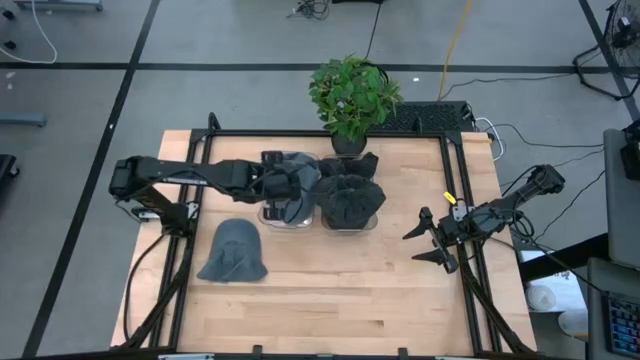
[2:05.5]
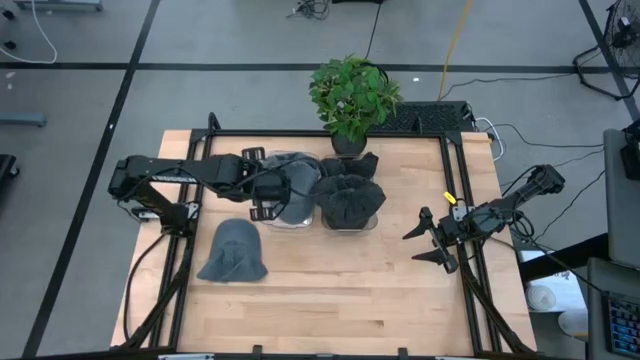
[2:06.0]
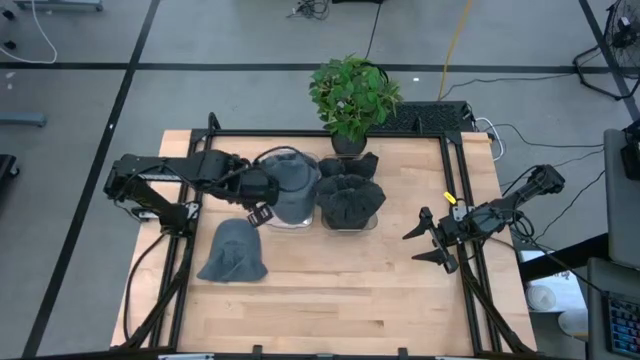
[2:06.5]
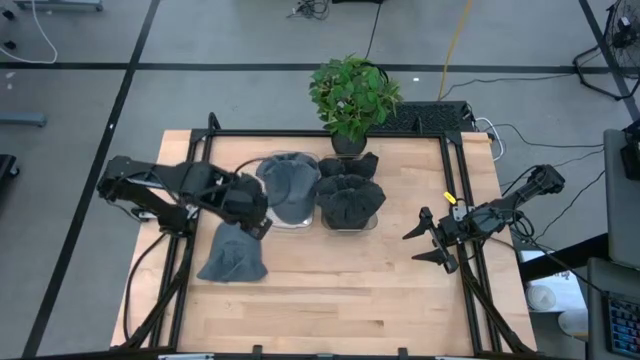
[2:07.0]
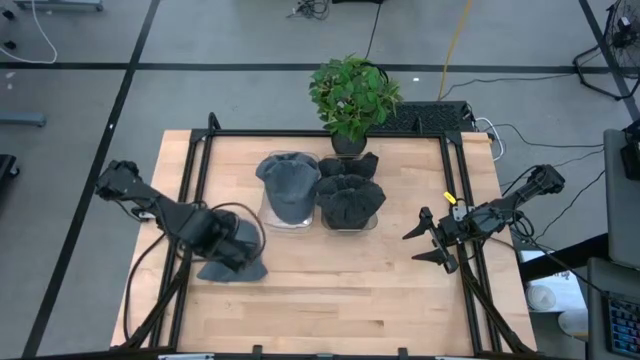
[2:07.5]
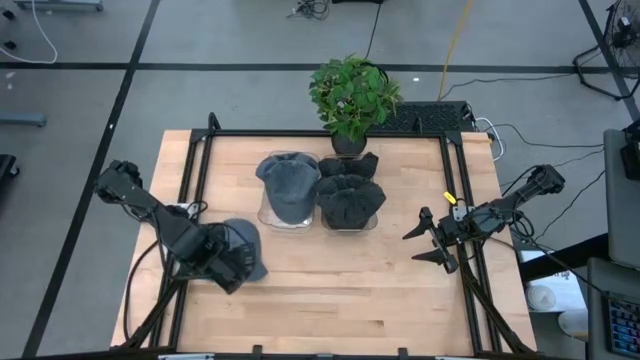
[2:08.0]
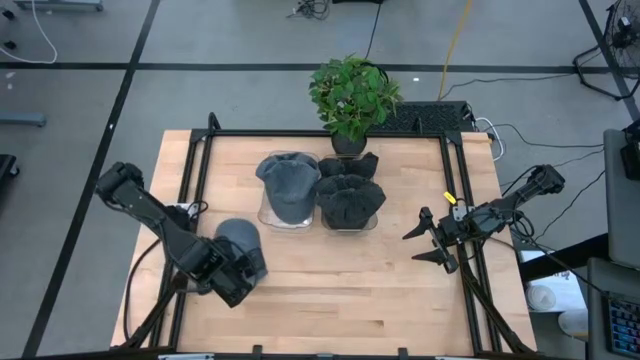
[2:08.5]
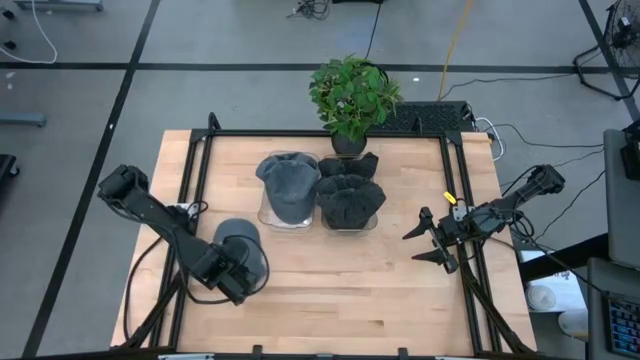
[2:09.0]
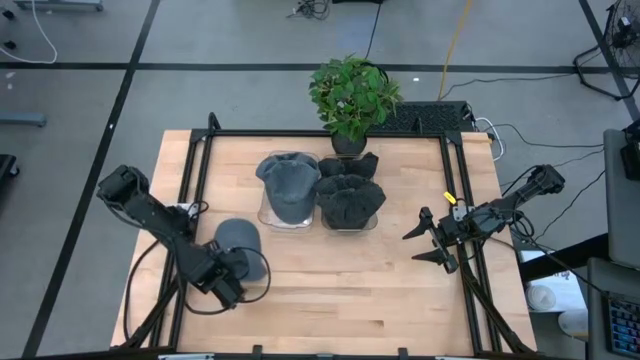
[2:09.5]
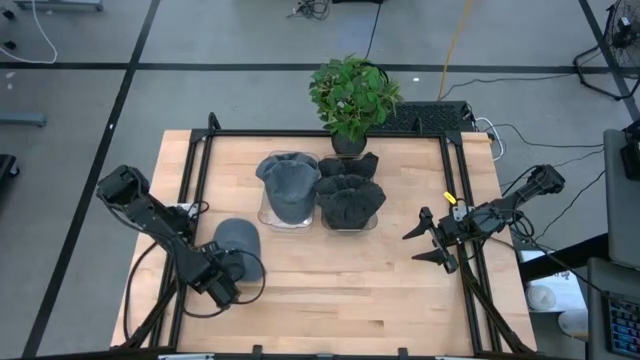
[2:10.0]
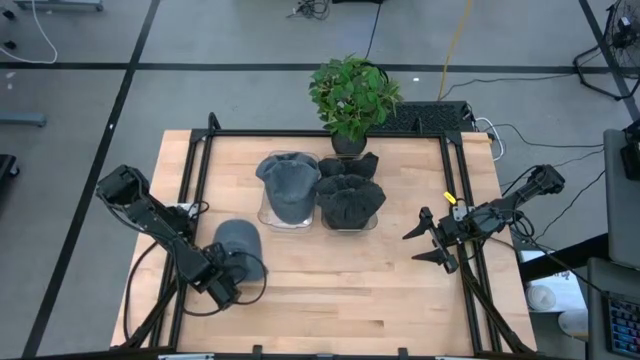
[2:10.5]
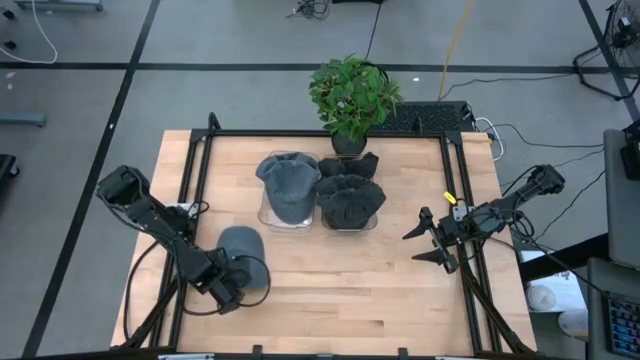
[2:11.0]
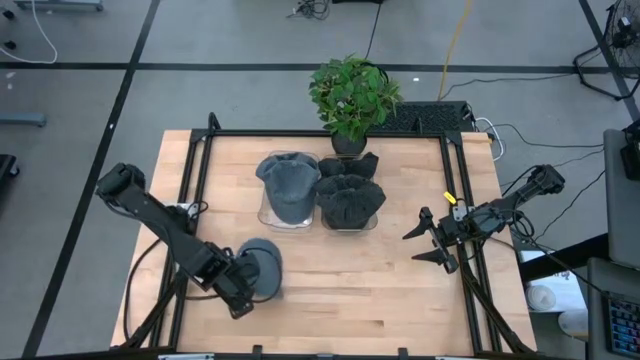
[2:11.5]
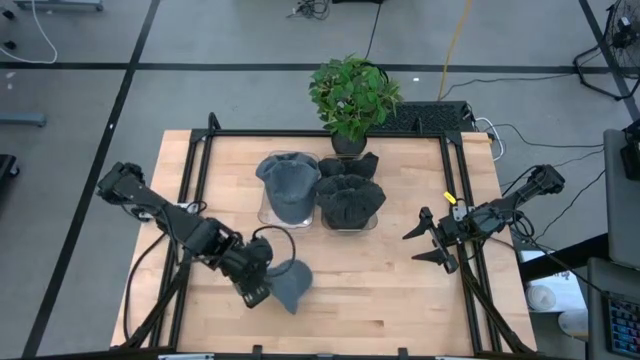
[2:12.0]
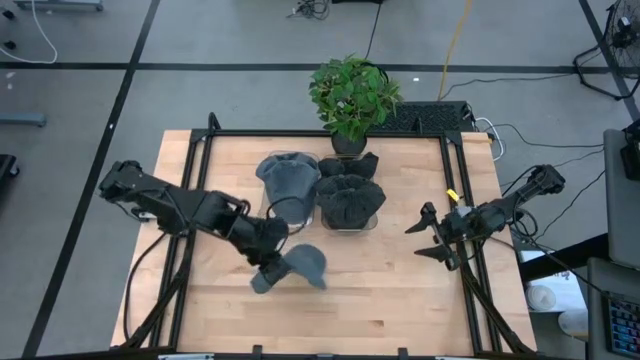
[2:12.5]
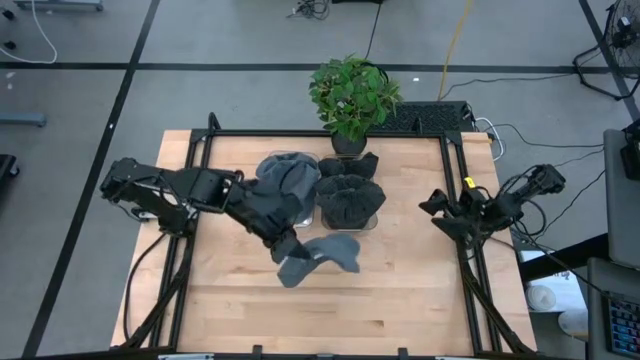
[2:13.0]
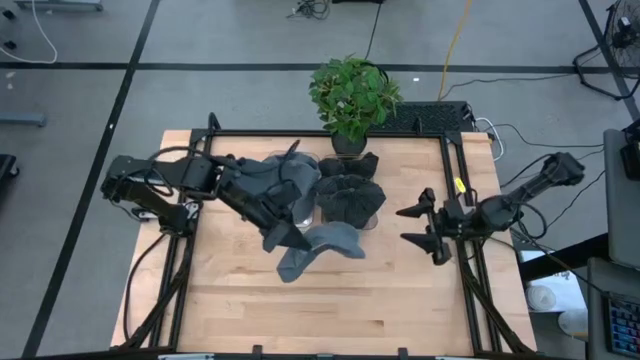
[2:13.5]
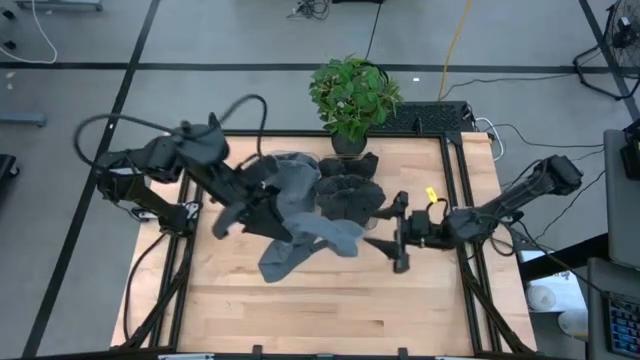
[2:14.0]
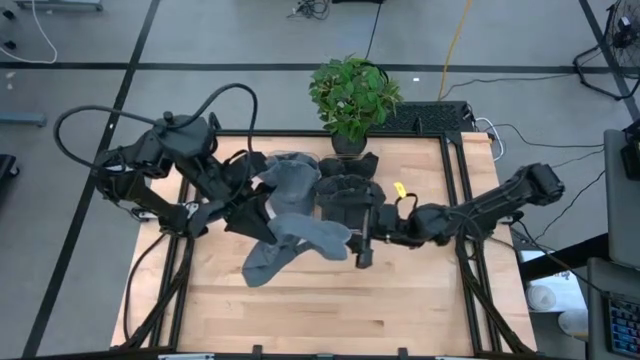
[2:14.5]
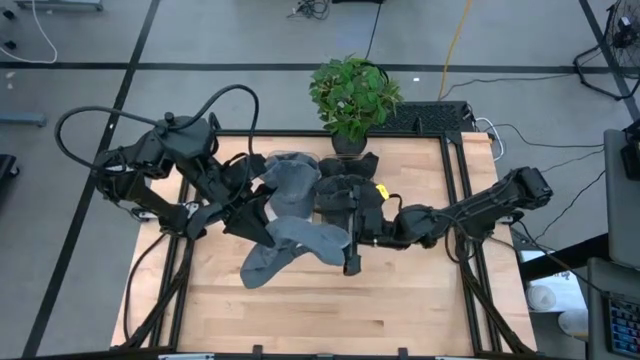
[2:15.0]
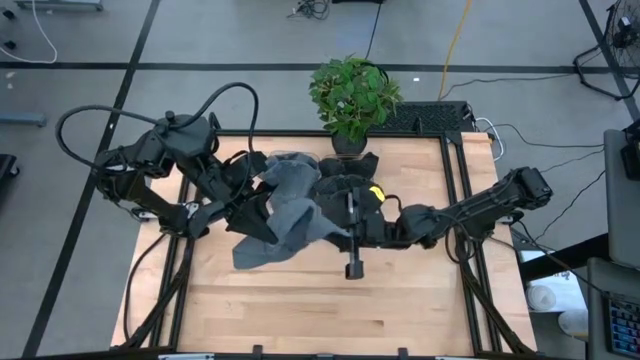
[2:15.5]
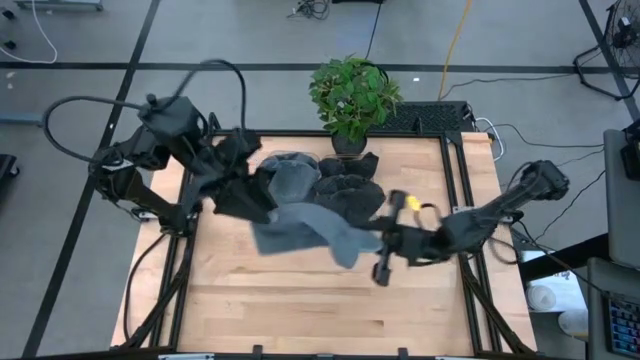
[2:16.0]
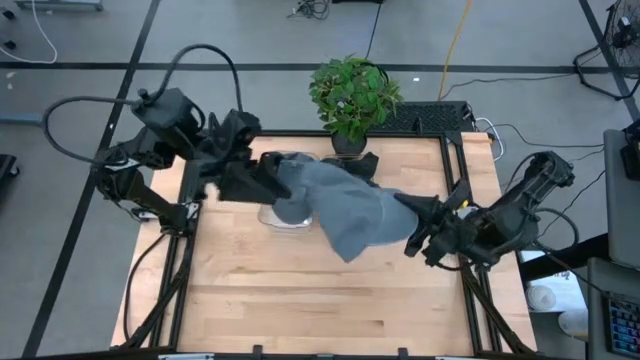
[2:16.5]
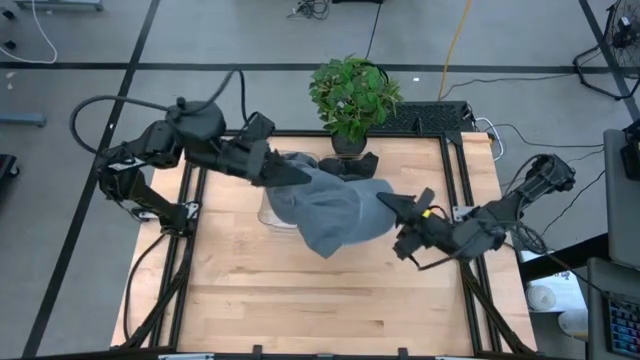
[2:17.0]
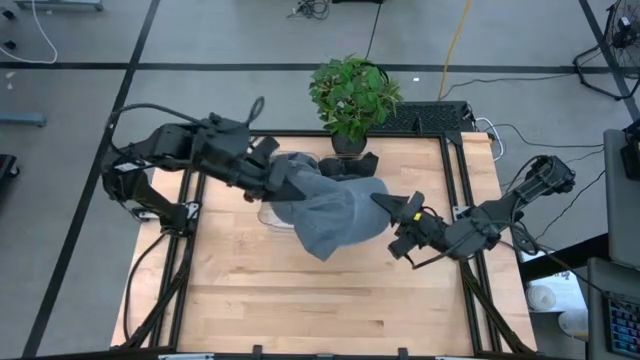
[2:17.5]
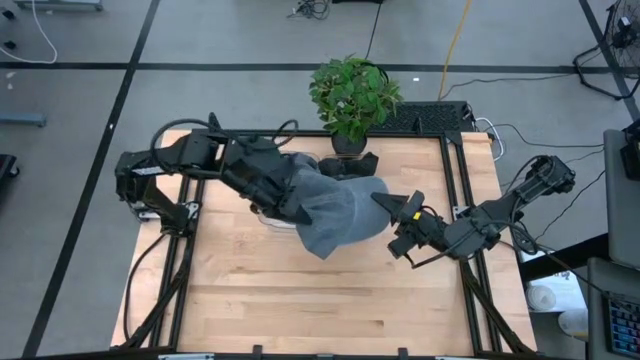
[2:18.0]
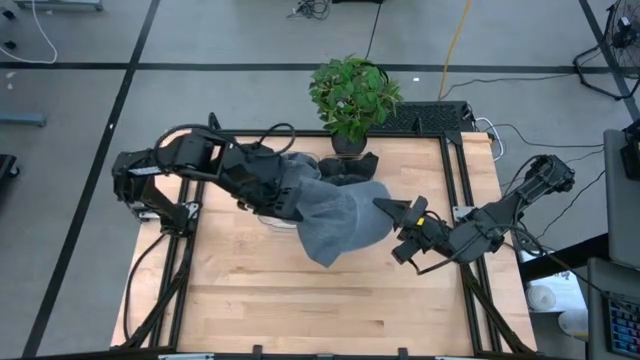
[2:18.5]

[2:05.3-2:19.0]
Task: Pick & Place hat
Put the blue cap into the left transparent bin

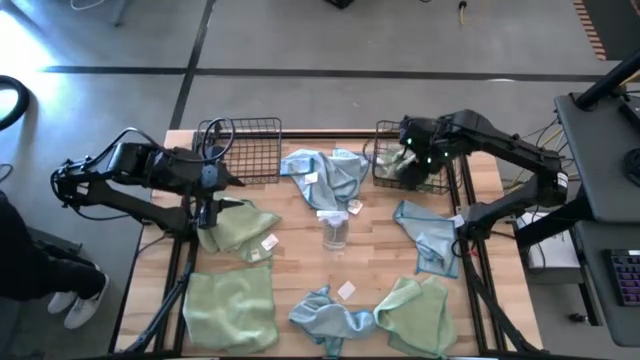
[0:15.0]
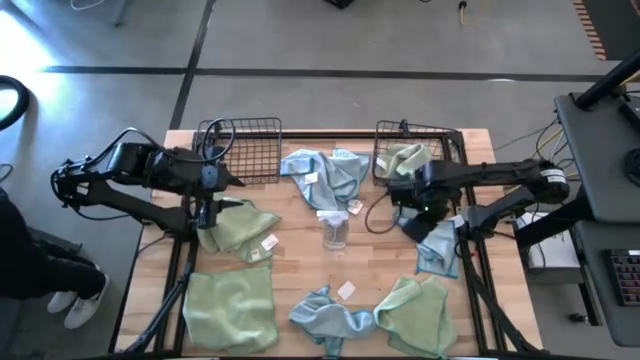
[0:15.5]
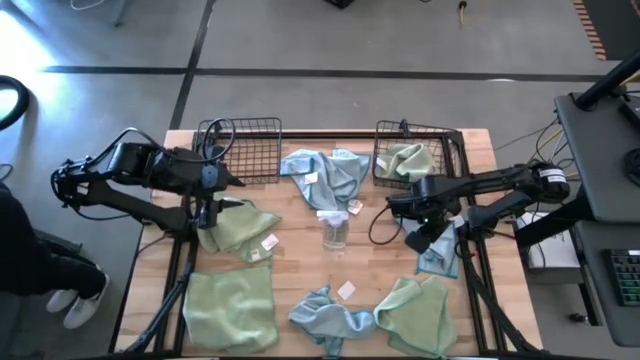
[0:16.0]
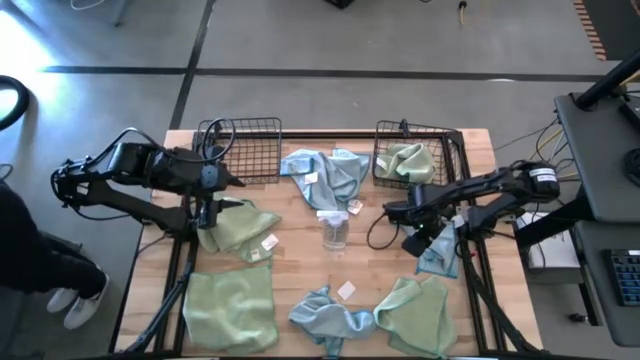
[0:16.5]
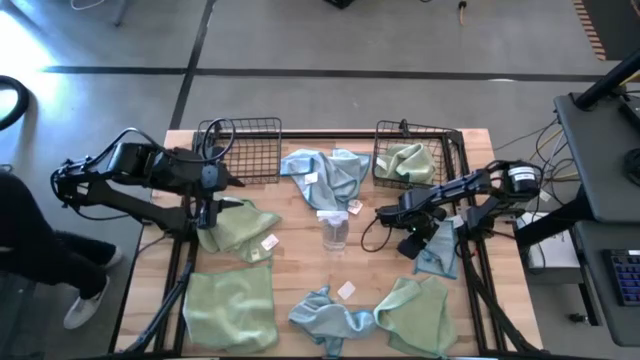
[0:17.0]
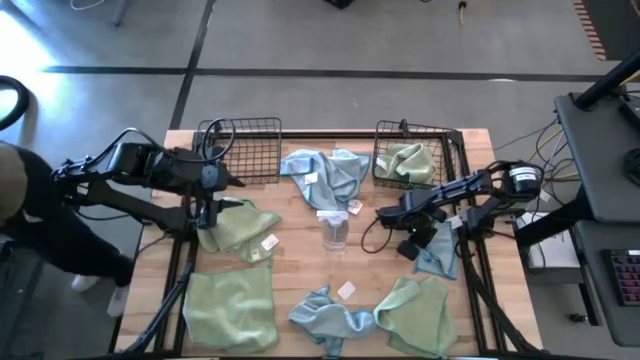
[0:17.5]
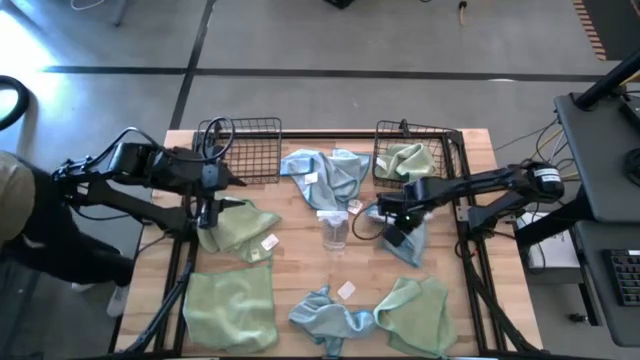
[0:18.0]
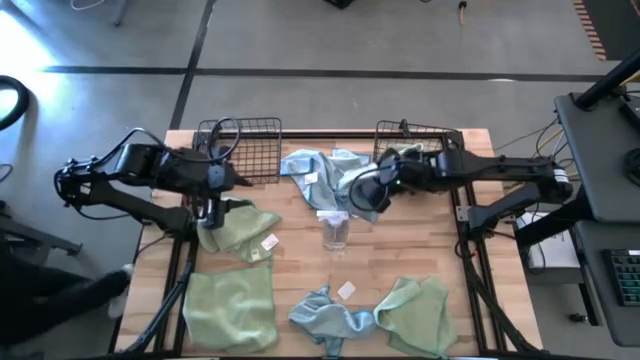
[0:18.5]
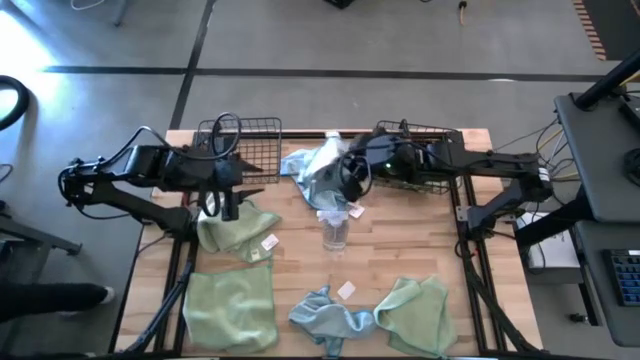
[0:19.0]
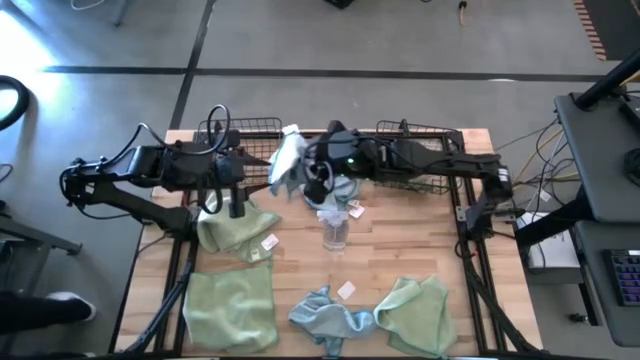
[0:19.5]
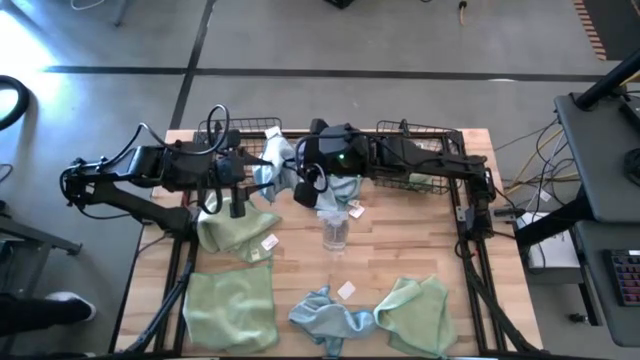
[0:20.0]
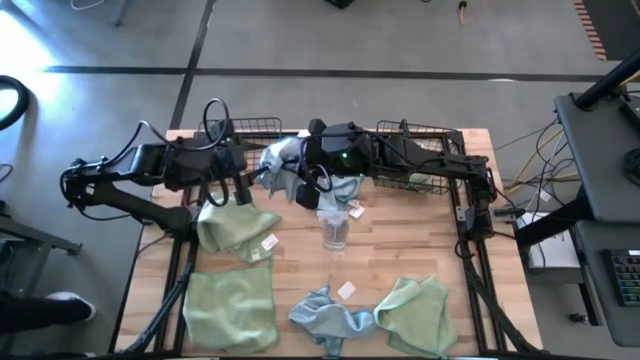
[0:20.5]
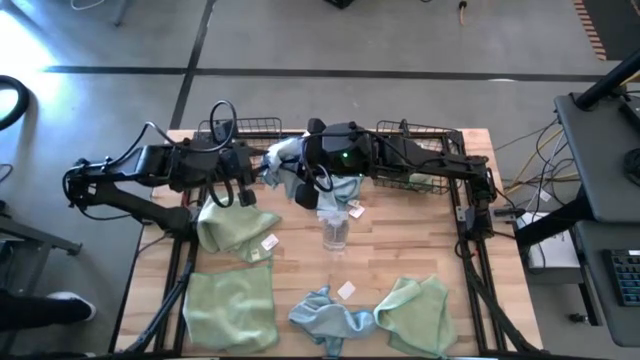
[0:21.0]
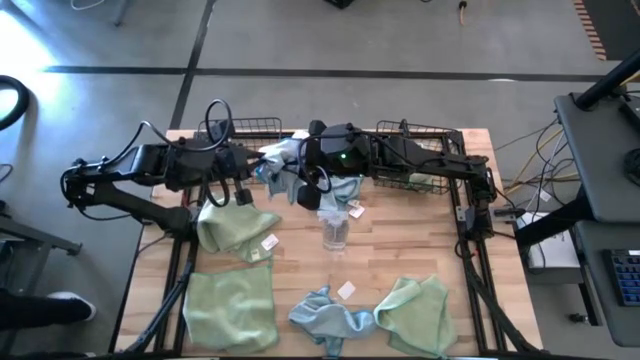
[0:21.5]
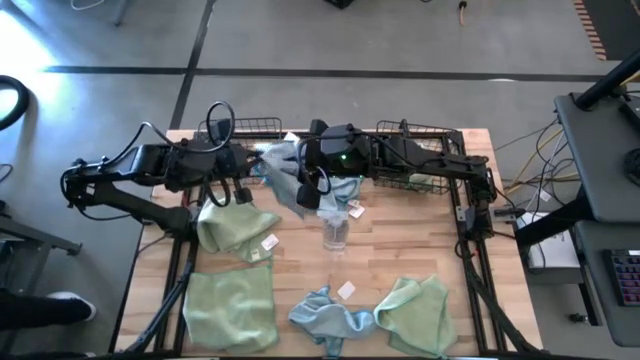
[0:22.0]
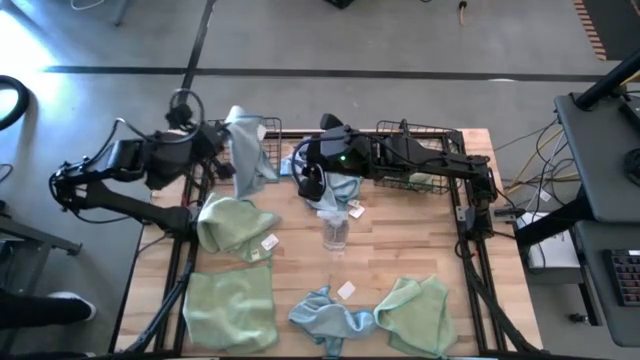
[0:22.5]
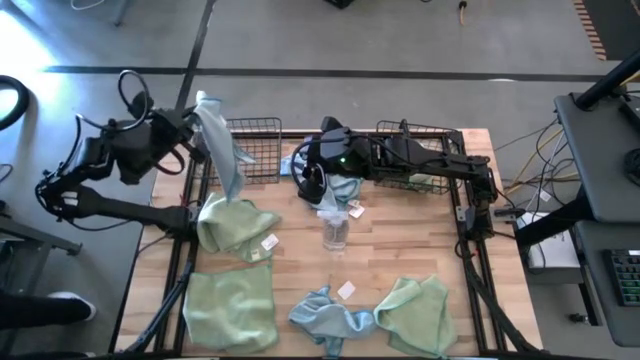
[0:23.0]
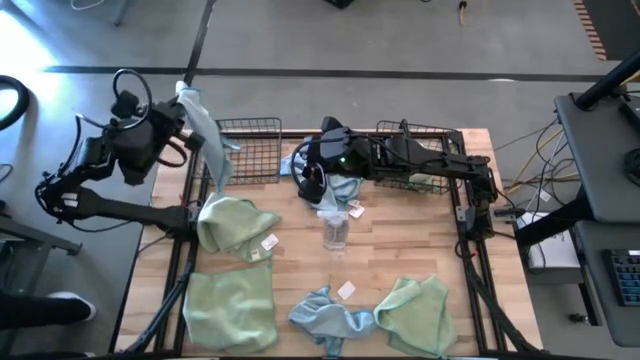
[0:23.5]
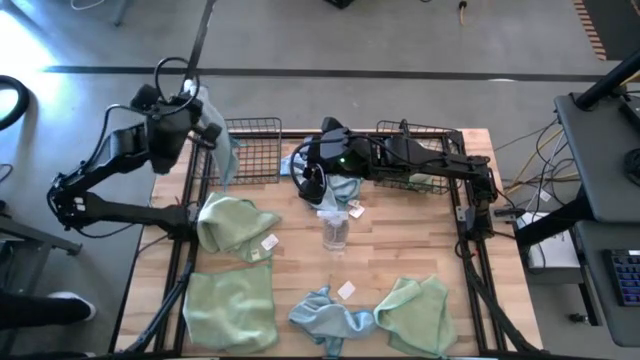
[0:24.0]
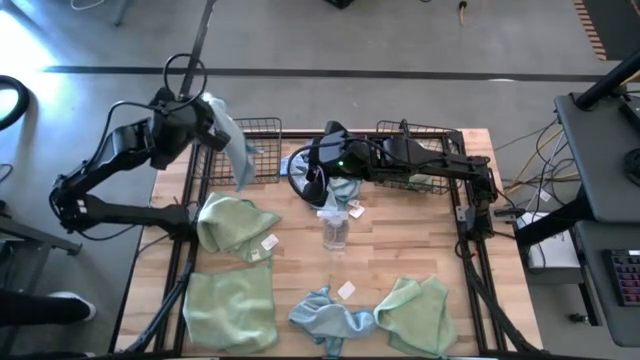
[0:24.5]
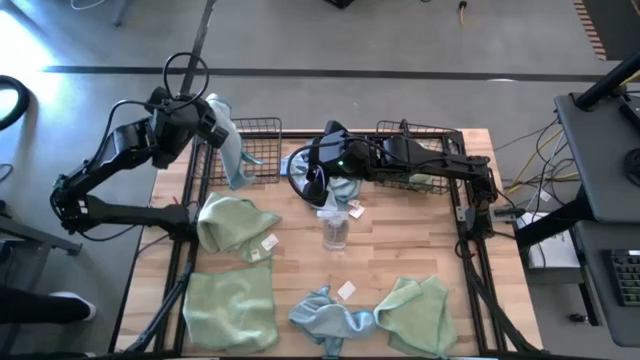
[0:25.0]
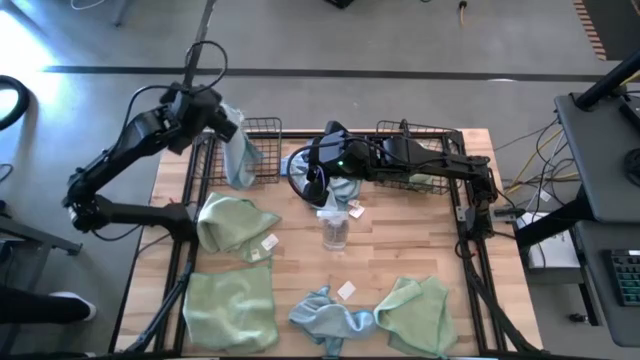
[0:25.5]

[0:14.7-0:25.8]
Task: Sort microfiber towel by color & place in baskets
Put the blue towel into the left wire basket
